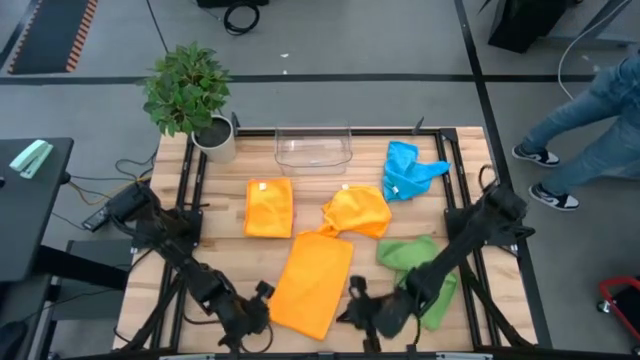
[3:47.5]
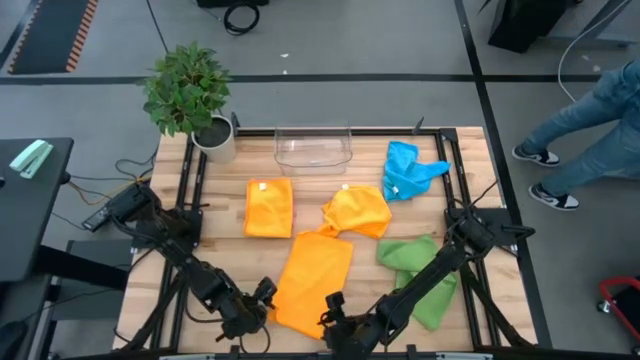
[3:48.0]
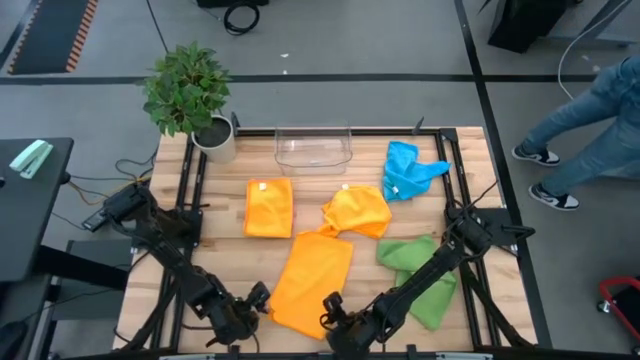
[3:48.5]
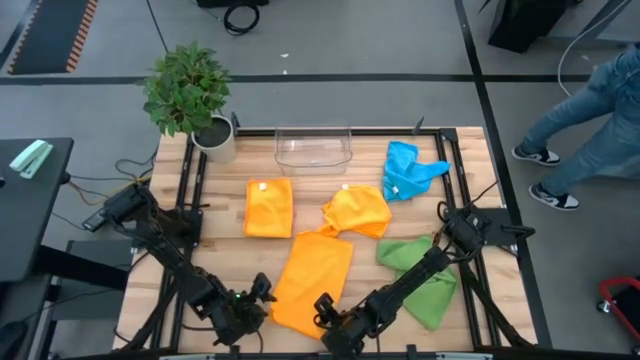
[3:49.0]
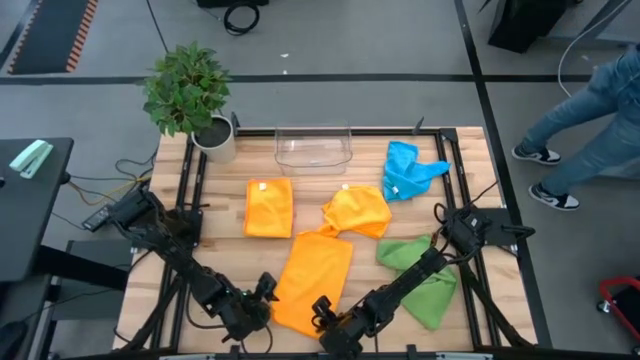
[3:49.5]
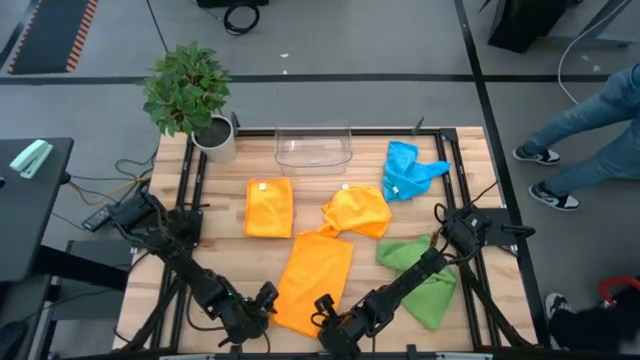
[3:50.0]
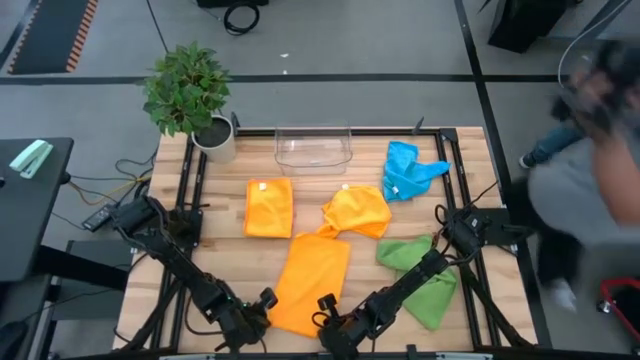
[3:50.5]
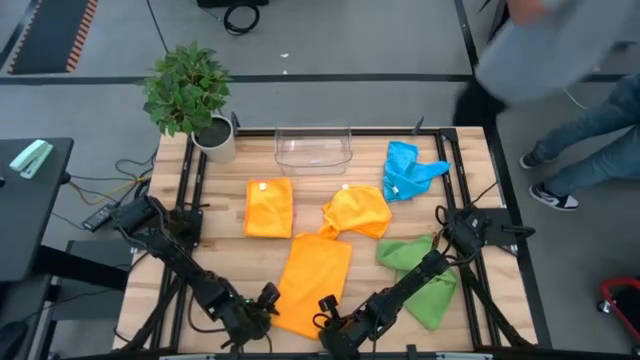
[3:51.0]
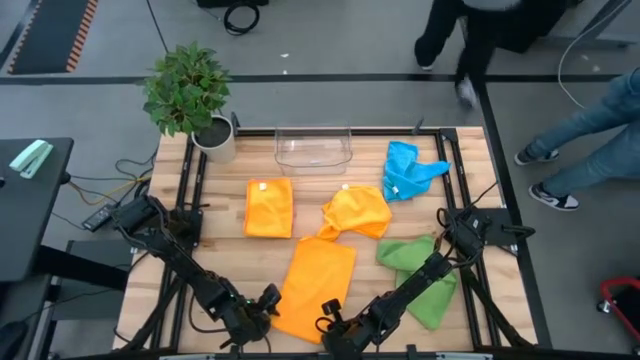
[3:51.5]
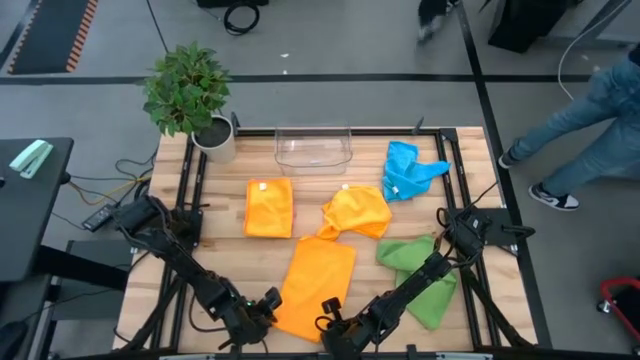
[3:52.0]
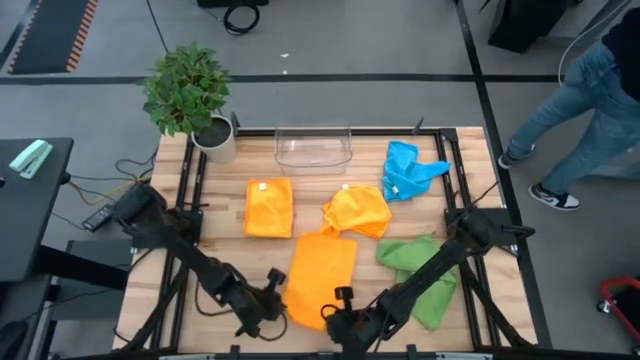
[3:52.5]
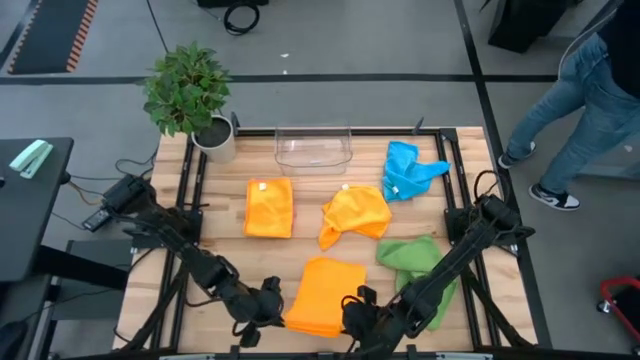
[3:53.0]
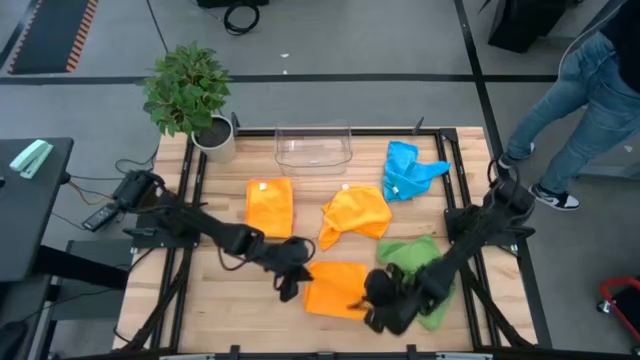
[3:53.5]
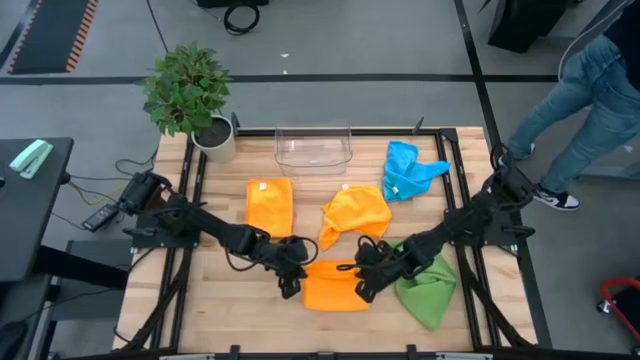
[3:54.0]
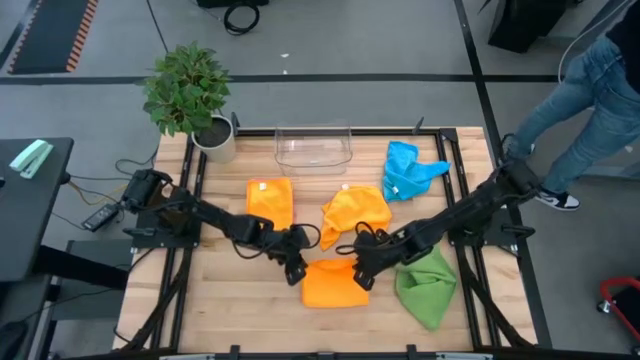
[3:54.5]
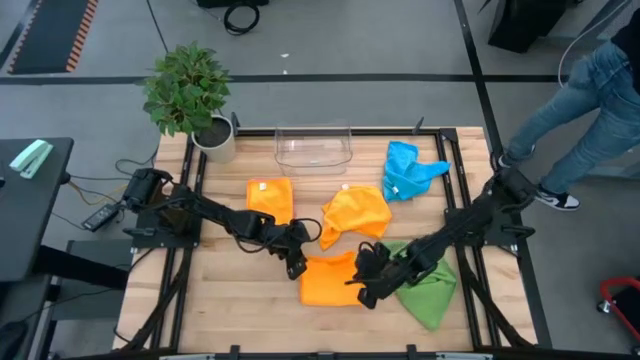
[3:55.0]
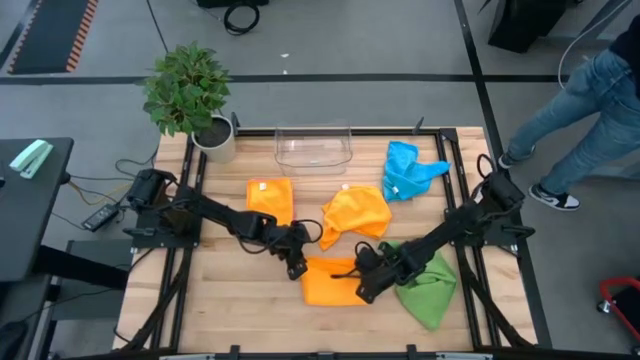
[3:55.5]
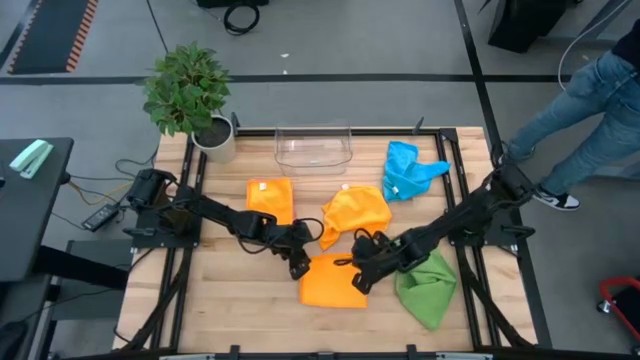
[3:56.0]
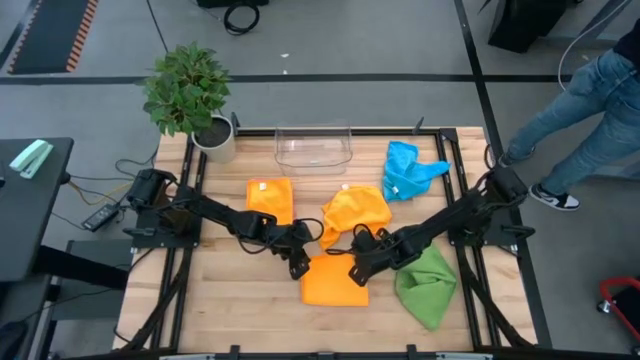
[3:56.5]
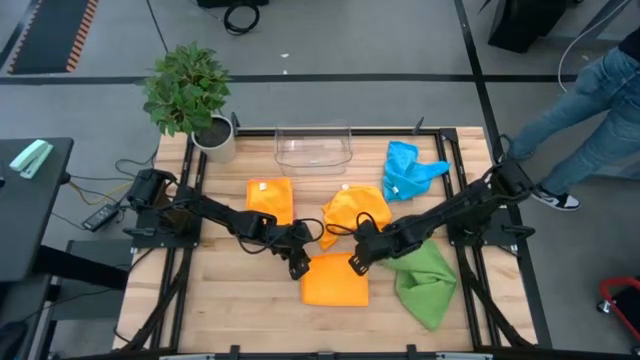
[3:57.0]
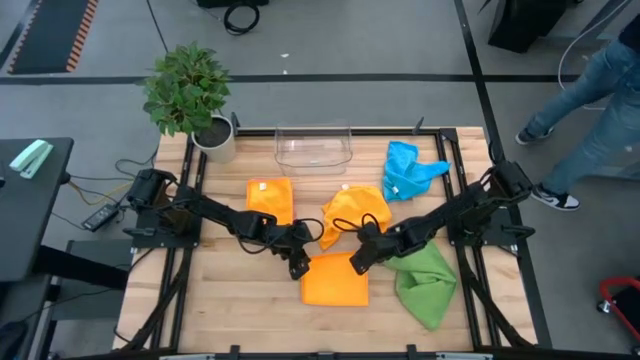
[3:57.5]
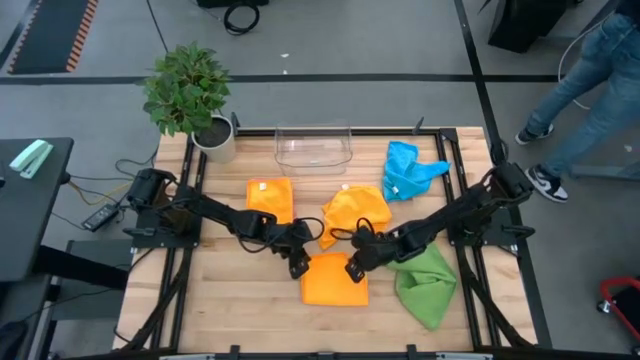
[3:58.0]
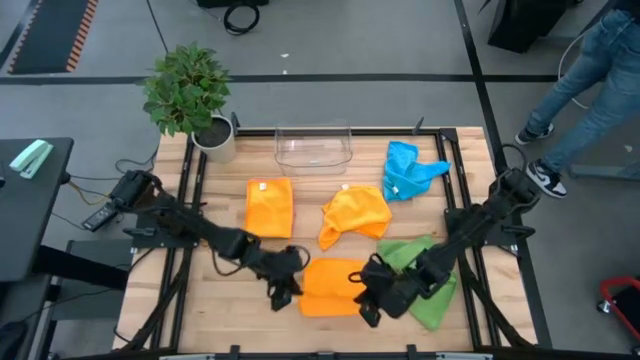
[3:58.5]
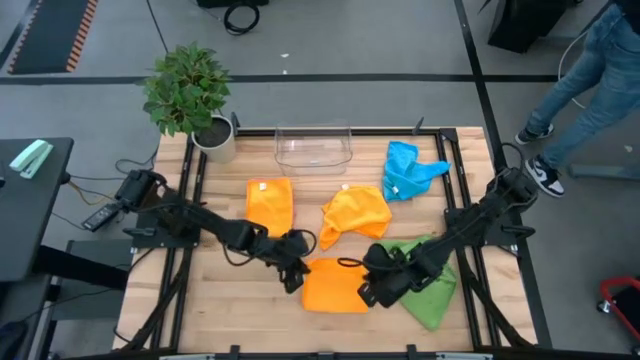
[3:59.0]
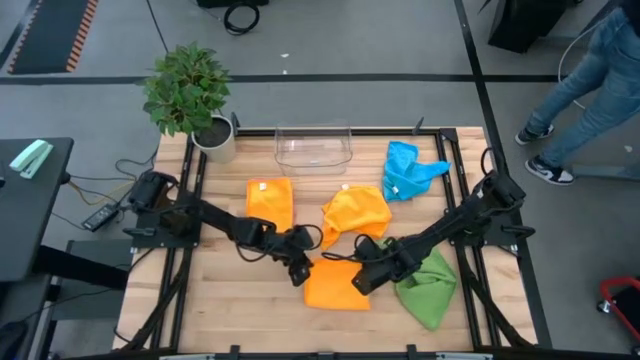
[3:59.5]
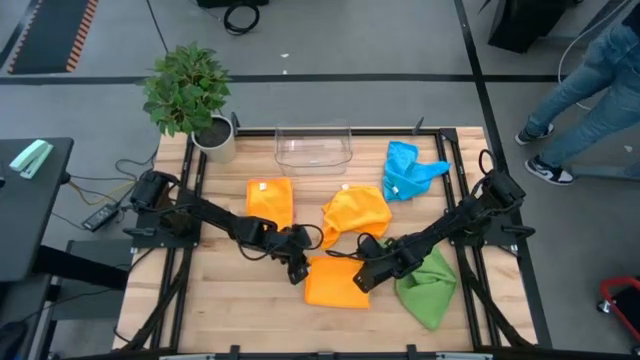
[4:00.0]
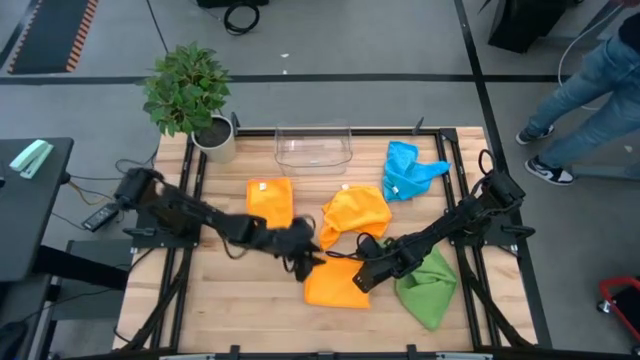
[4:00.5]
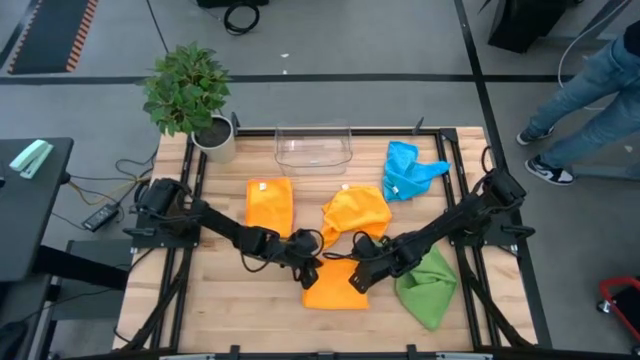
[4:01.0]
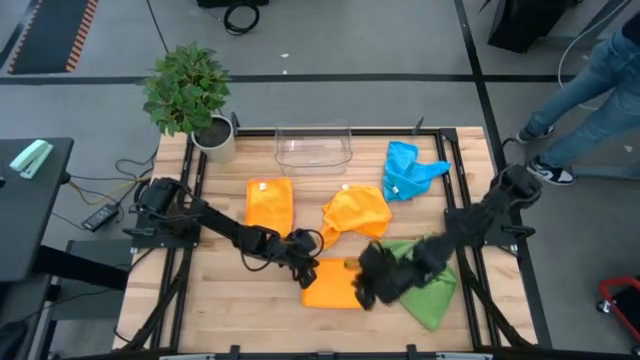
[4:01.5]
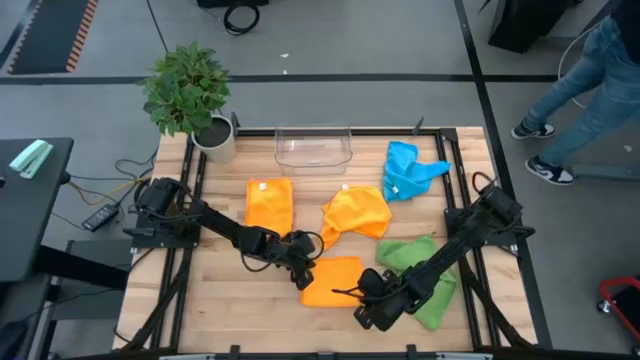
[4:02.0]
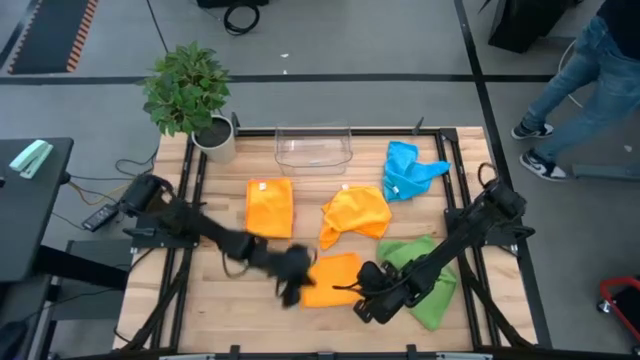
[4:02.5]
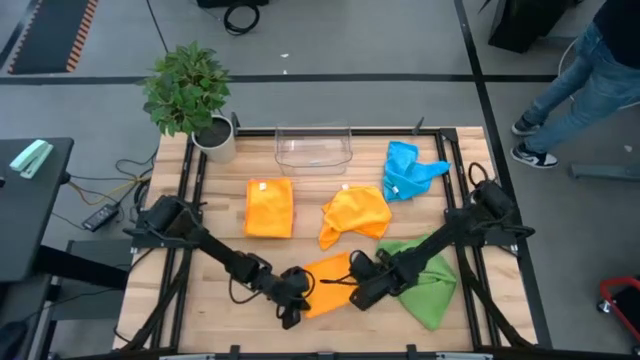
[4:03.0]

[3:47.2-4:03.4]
Task: Fold microfiber towels
Fold the left orange microfiber cloth

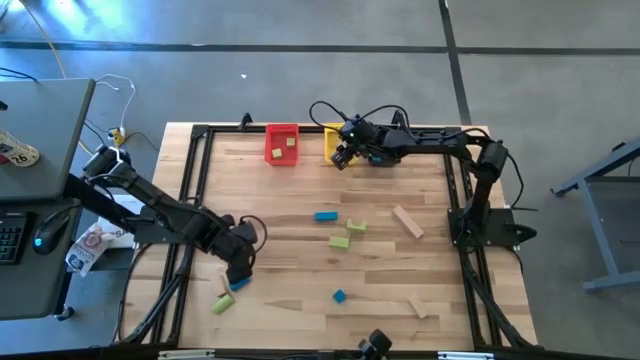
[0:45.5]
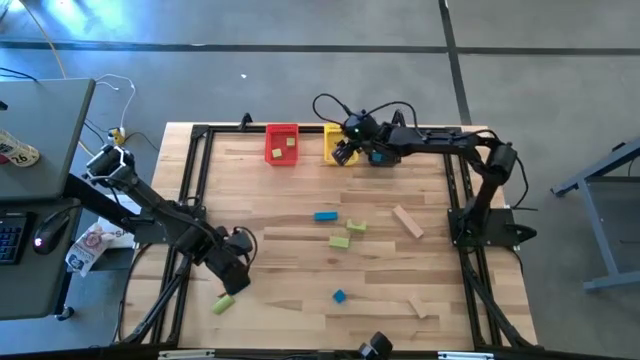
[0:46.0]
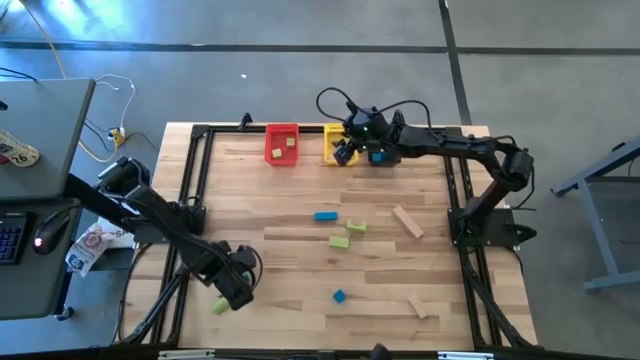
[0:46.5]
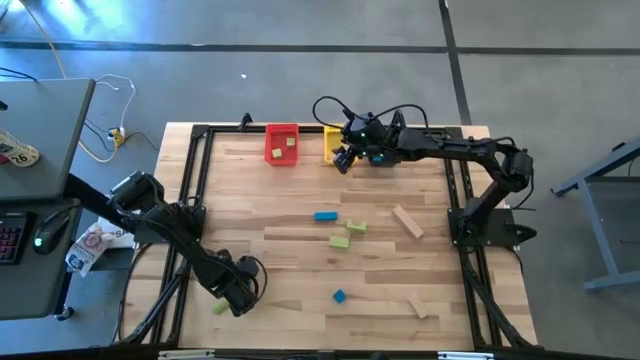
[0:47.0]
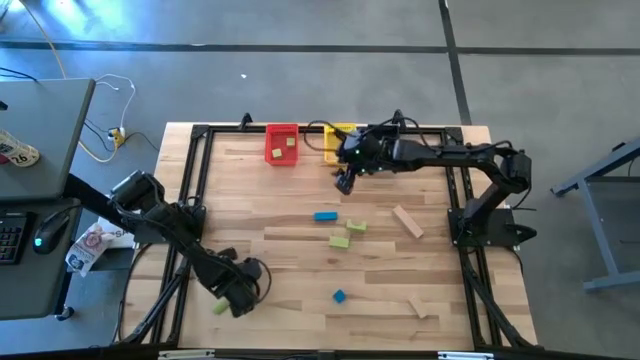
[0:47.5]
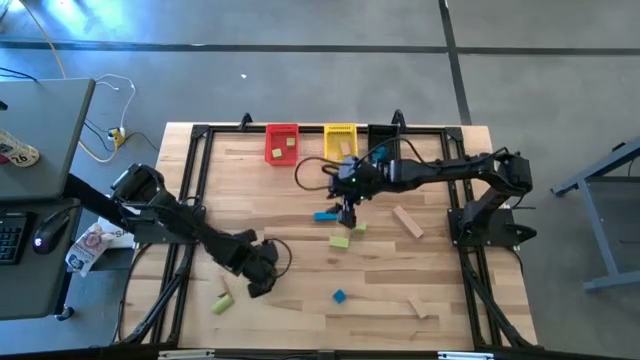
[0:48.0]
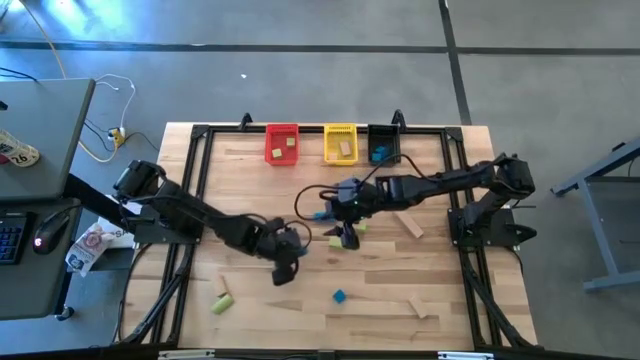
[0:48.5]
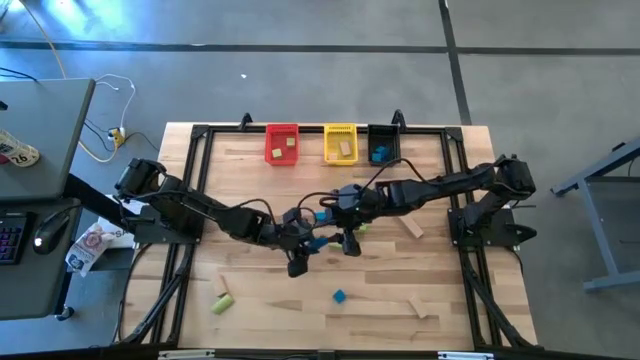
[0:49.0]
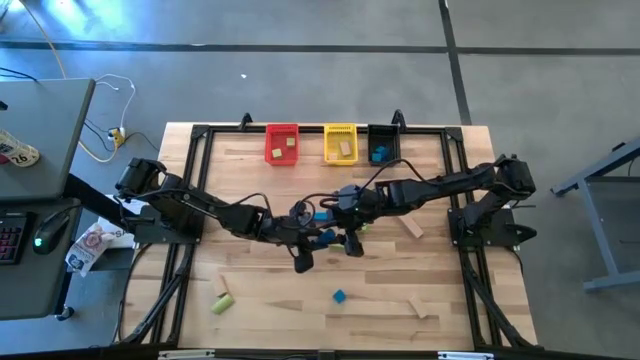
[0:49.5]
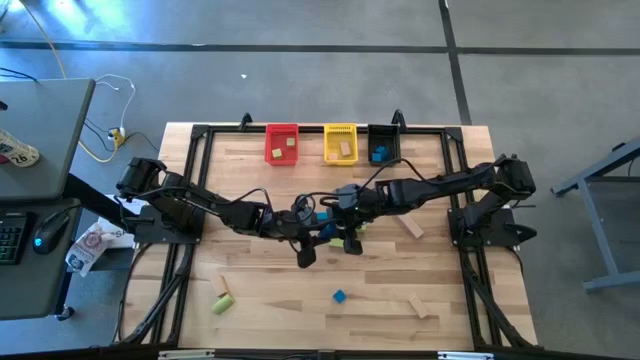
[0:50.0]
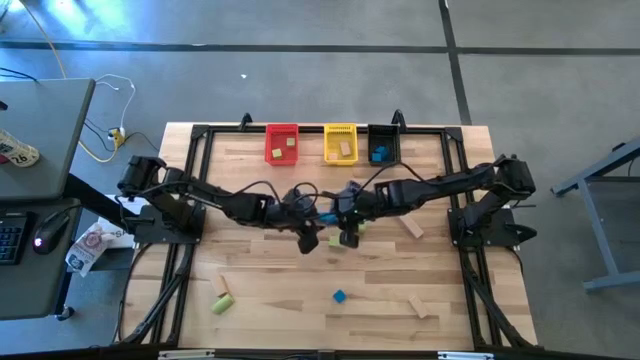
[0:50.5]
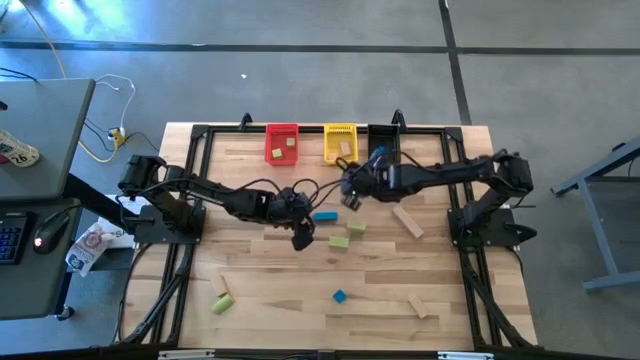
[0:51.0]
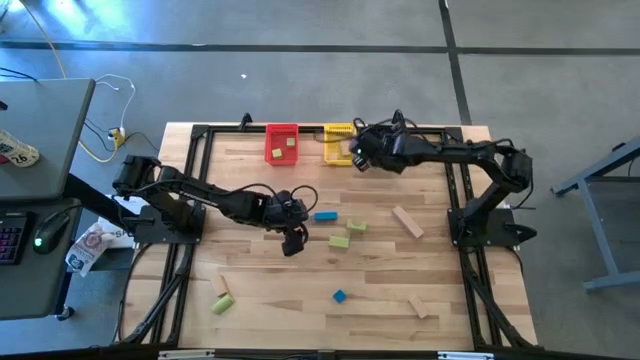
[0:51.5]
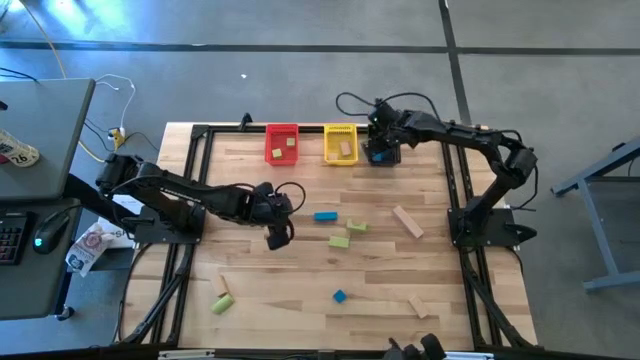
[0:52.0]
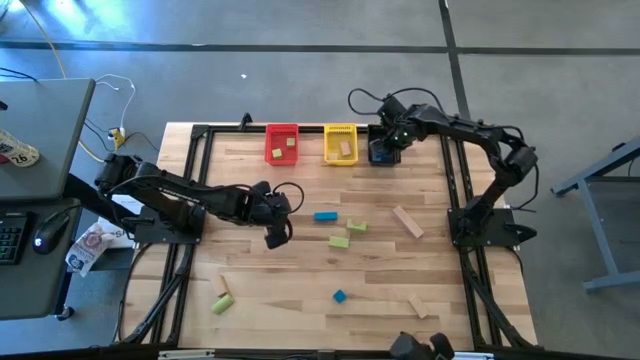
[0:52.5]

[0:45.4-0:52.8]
Task: Sort & place blocks by color
Put the blue block into the black bin
